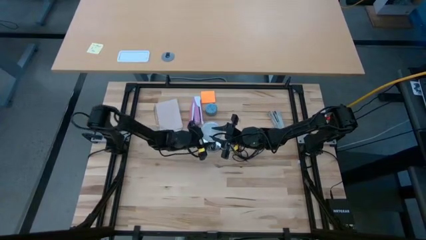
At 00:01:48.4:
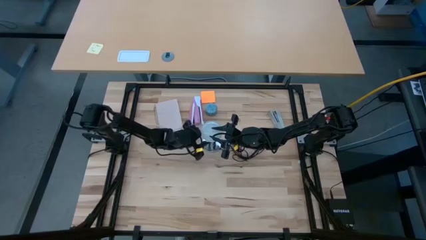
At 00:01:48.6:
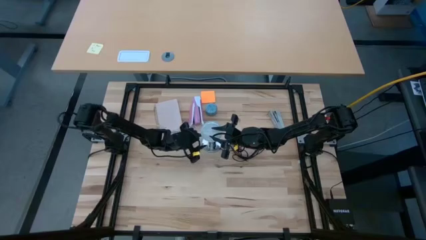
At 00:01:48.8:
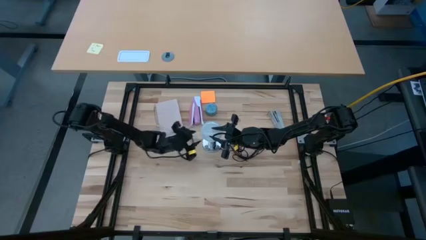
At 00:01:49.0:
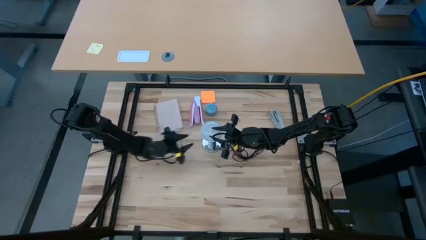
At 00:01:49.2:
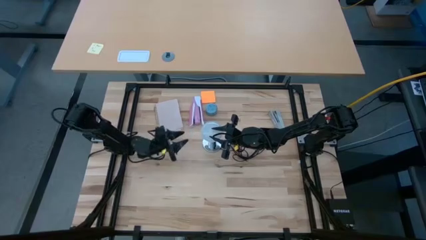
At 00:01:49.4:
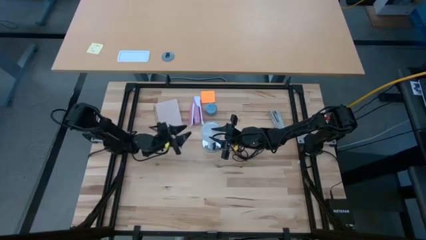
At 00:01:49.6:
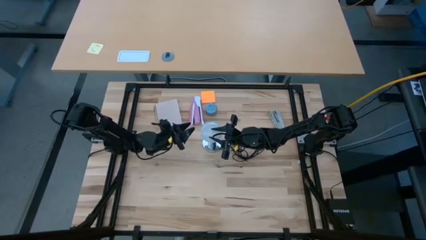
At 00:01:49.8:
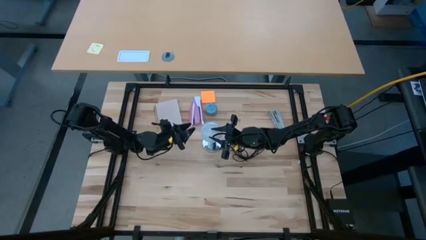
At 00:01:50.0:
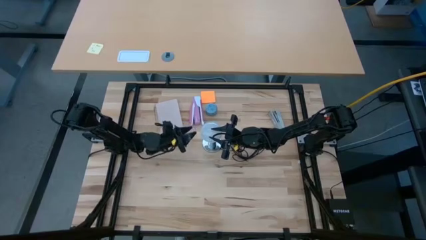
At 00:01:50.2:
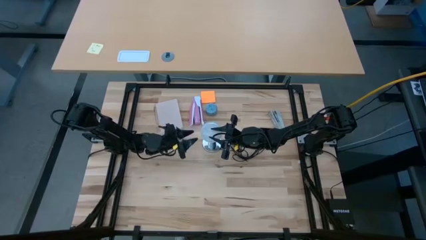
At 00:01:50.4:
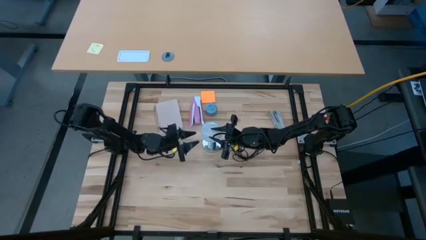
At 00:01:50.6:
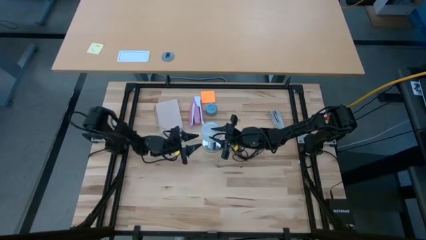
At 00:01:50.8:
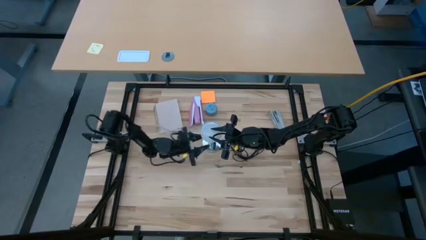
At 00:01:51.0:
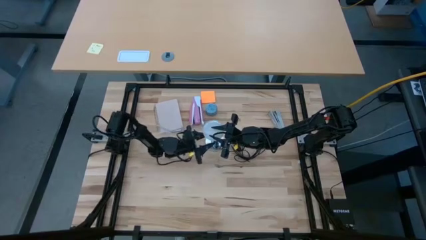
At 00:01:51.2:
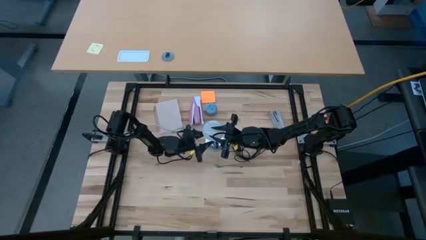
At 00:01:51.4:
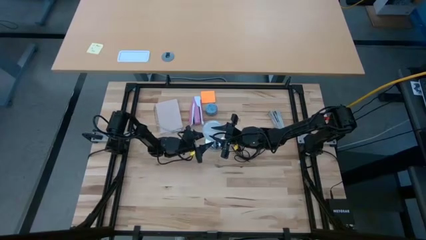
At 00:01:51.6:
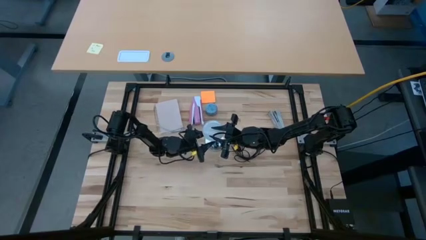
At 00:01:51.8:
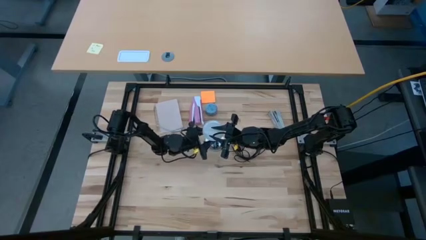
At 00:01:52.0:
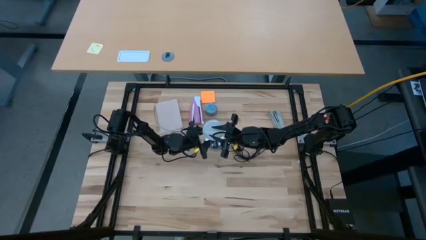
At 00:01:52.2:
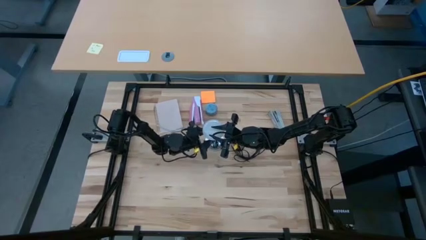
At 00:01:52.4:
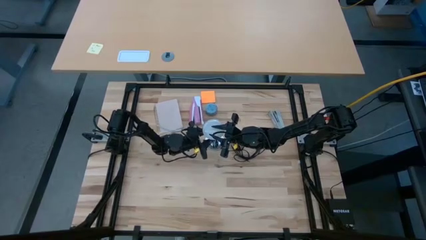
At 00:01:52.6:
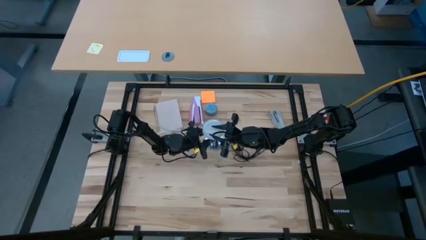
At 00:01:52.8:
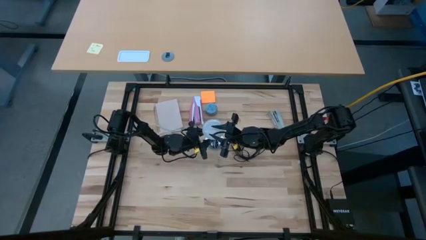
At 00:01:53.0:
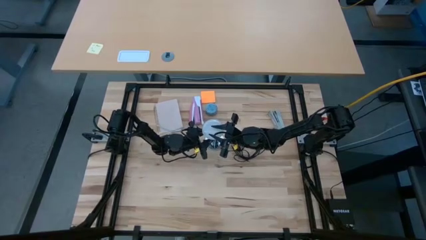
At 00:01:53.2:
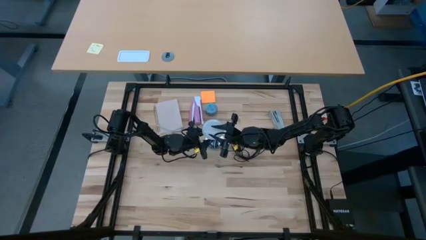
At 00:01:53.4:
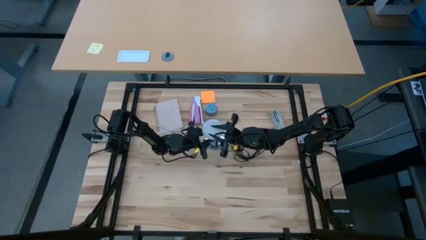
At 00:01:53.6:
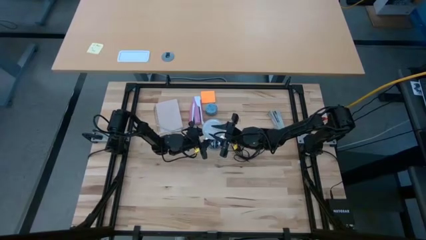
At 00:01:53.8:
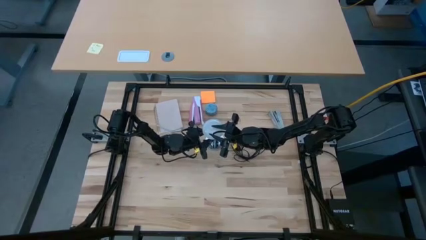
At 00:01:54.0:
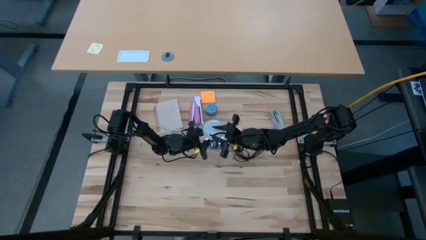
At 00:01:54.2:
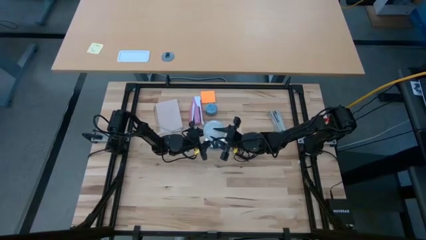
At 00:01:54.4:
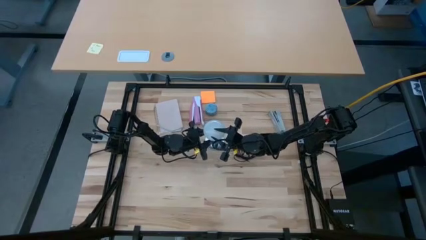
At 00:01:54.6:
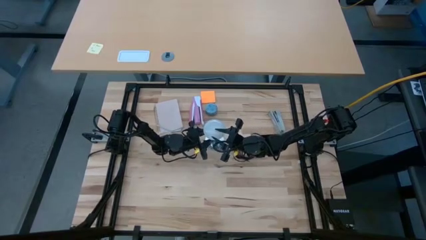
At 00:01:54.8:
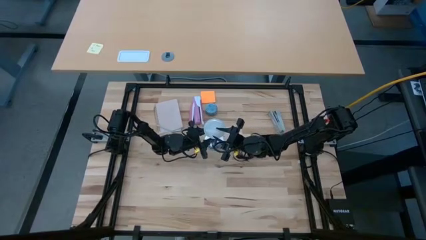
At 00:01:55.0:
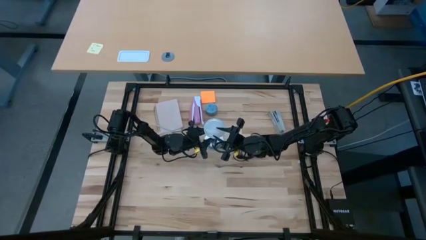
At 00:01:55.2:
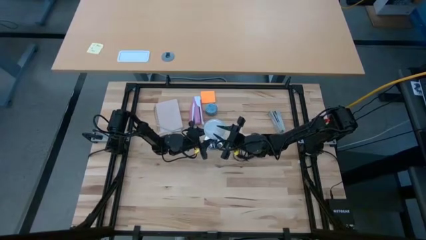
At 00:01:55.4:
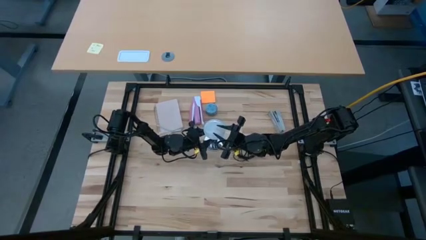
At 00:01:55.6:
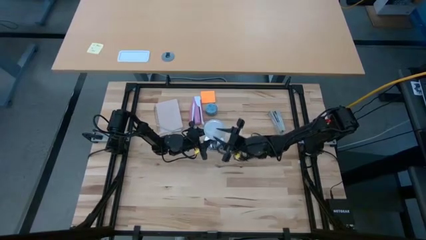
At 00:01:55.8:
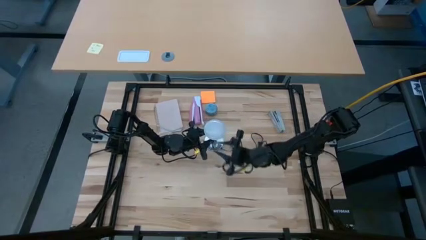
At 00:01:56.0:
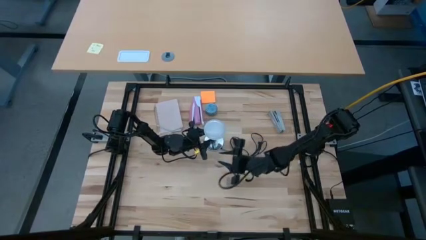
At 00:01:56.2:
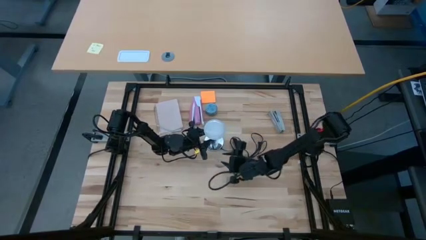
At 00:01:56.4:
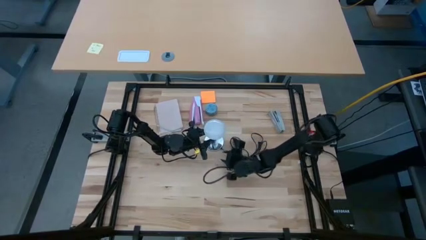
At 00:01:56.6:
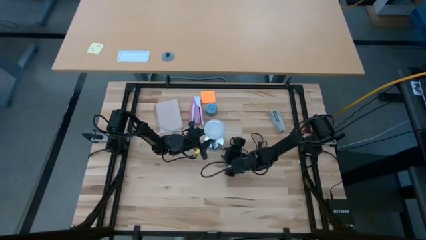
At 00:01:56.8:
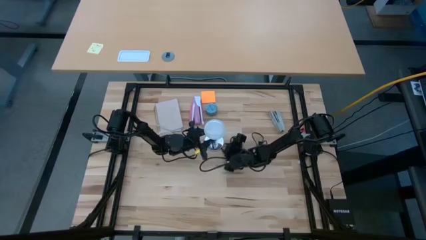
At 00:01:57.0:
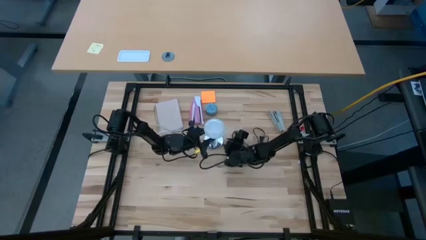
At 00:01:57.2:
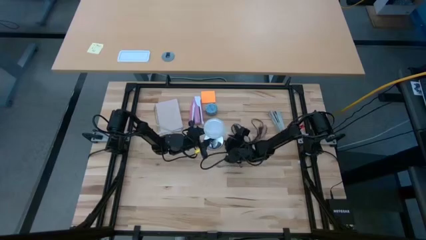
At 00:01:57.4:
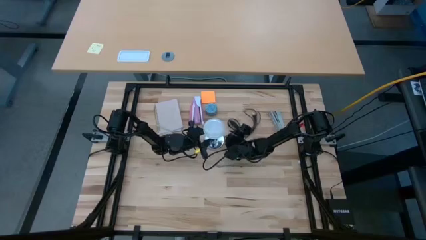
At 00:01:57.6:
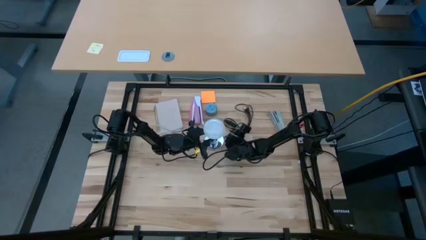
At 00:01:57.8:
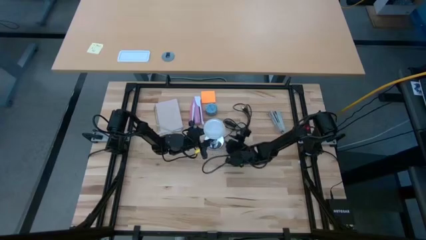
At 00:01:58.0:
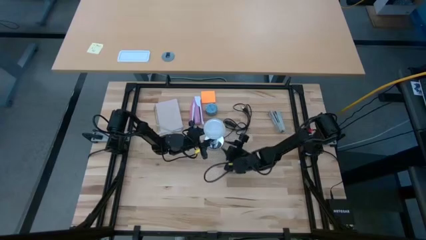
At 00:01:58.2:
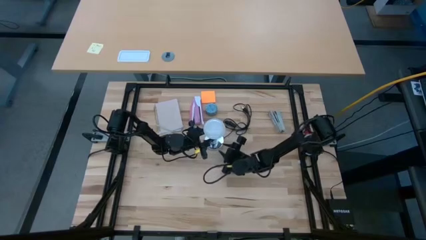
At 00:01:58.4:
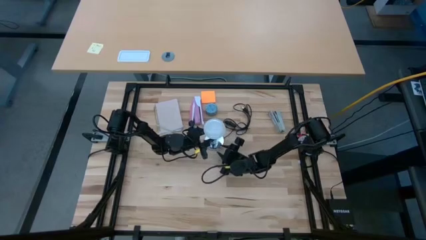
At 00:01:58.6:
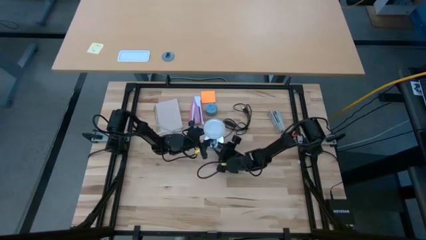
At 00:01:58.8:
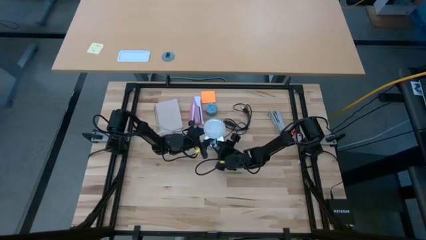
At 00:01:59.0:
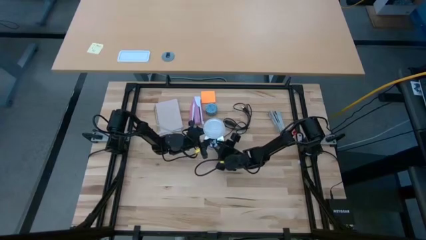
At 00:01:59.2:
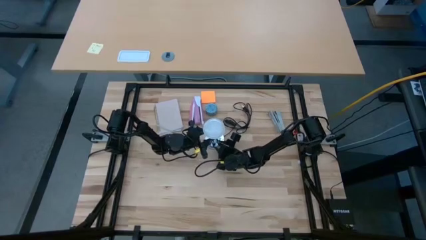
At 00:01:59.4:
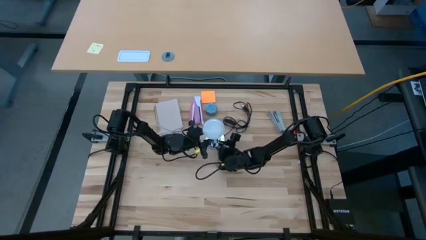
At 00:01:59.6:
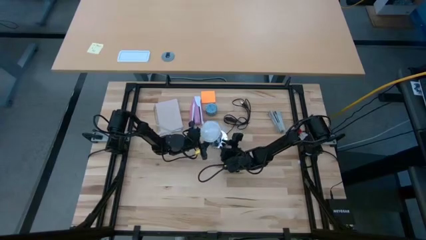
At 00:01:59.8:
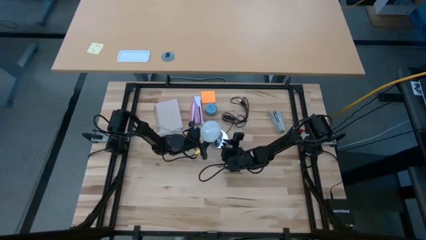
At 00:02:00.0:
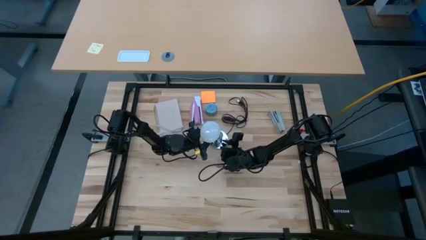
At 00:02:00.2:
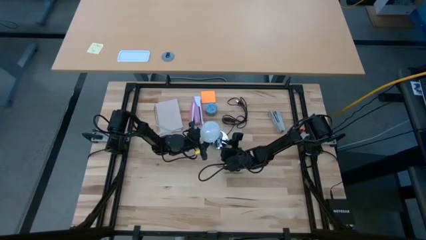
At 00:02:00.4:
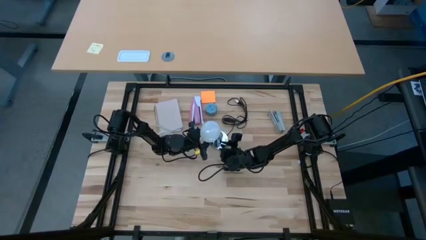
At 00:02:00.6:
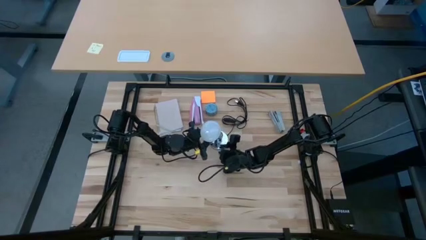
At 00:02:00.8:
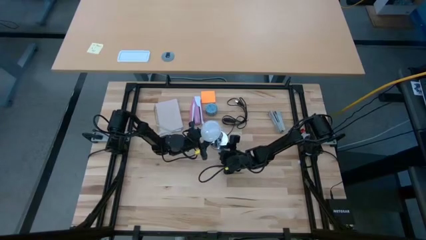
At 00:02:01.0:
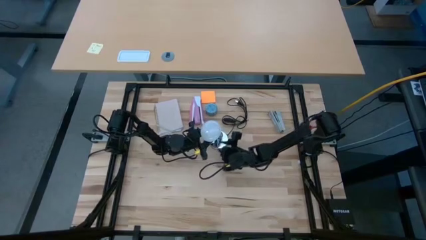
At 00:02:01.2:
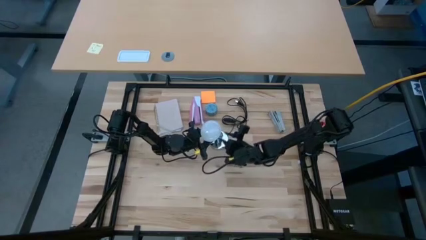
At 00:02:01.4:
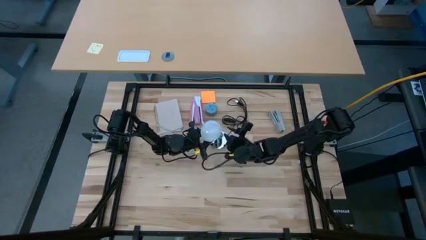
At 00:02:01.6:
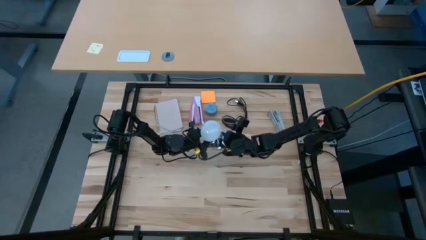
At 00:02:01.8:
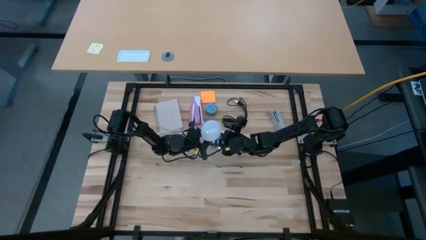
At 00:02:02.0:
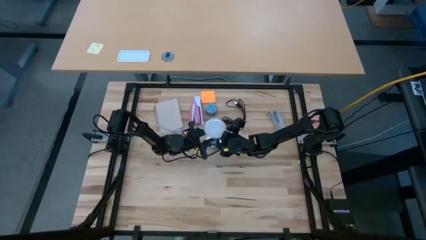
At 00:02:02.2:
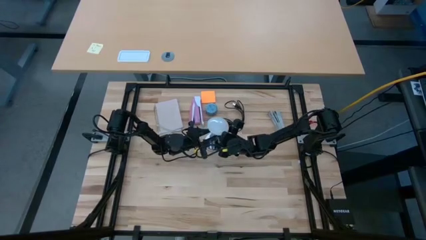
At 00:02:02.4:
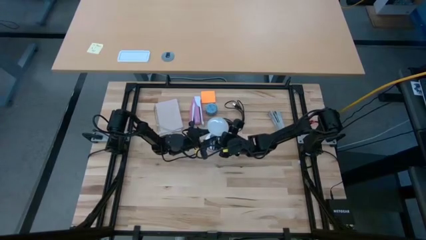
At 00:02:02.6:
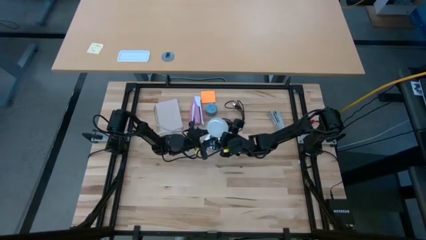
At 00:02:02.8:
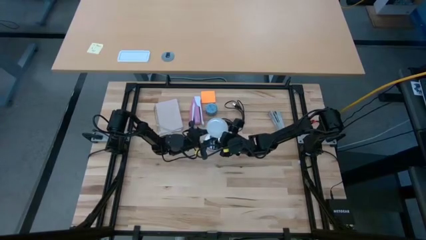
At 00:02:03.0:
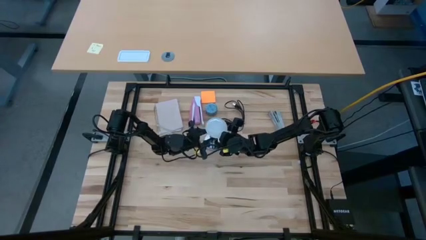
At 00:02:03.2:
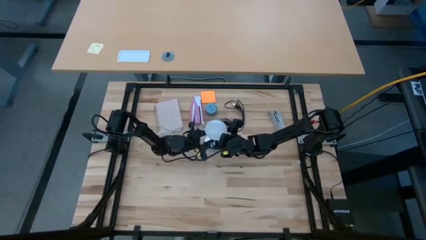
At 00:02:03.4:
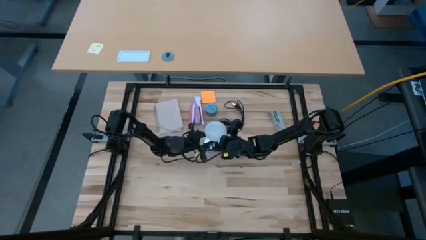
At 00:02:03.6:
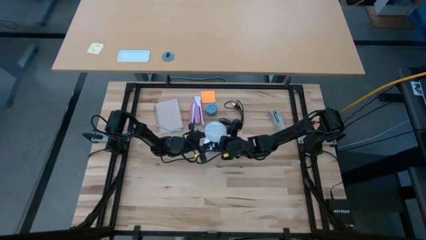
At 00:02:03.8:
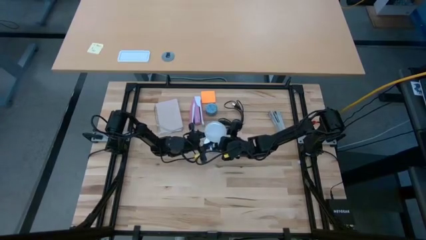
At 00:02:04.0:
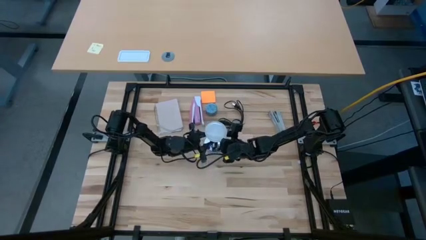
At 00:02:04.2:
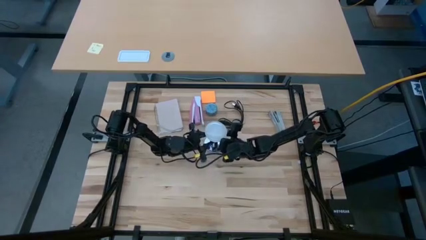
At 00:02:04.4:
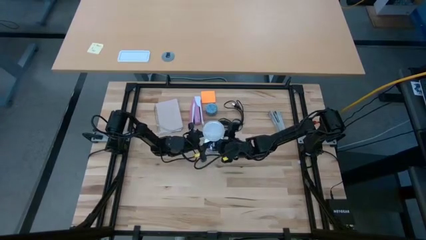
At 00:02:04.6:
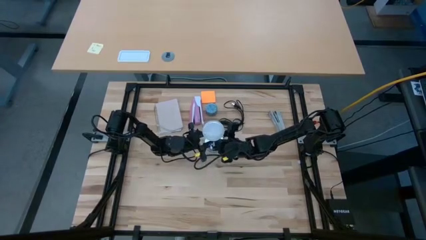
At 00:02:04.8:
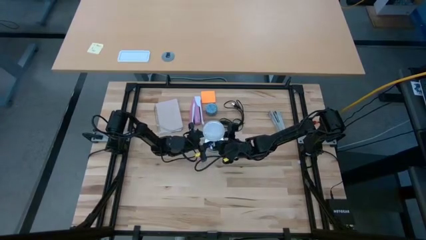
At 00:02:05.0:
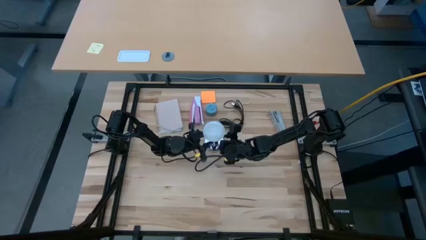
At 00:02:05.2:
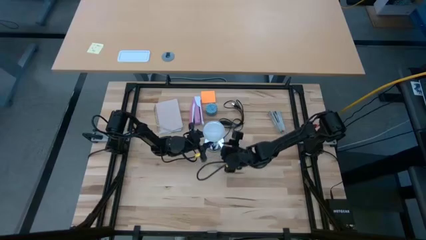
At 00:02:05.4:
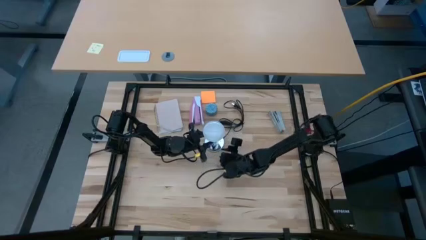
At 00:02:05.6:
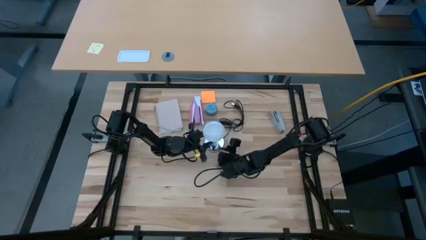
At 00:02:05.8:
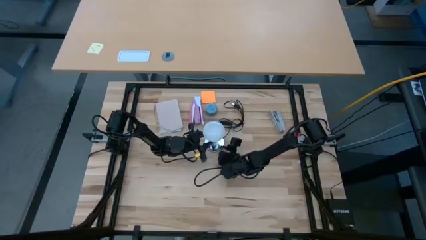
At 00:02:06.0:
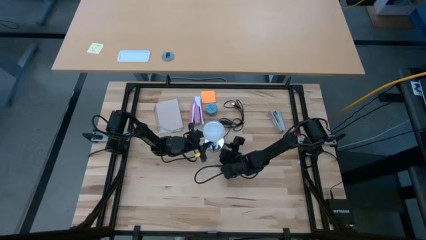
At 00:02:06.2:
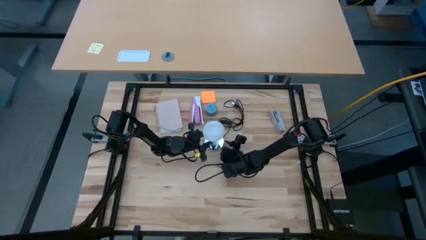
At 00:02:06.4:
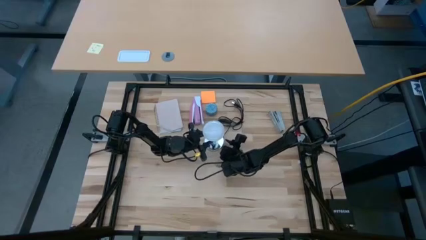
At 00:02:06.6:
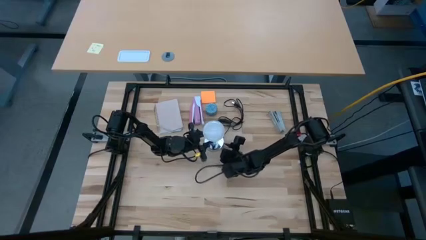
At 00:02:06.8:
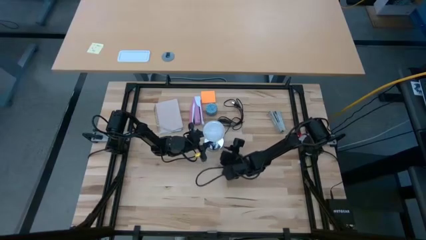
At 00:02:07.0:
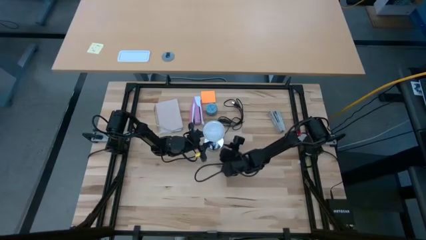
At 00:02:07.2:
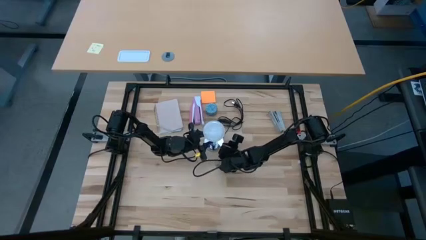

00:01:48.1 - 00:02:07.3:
Task: Screw lightbulb
Insert the lightbulb into the lamp
